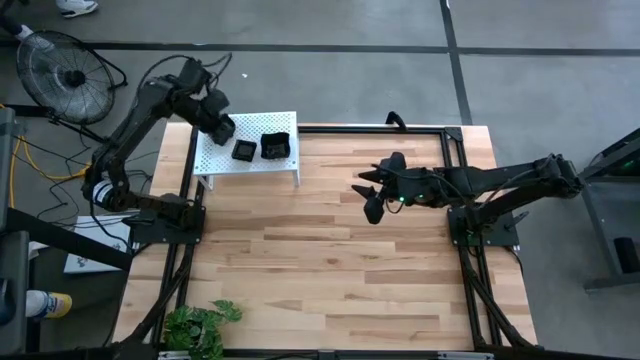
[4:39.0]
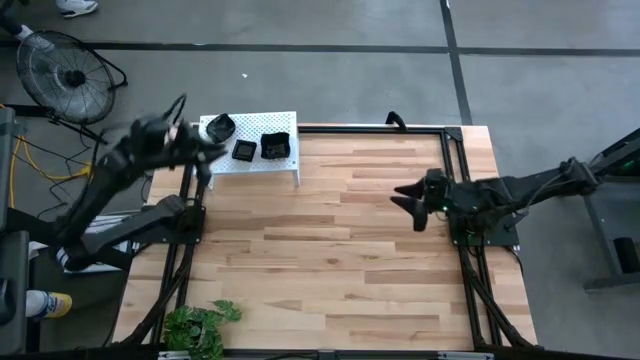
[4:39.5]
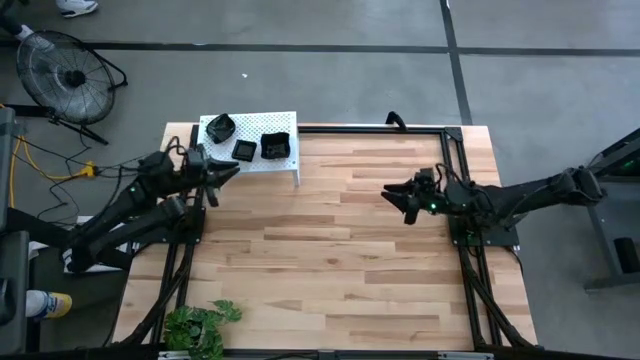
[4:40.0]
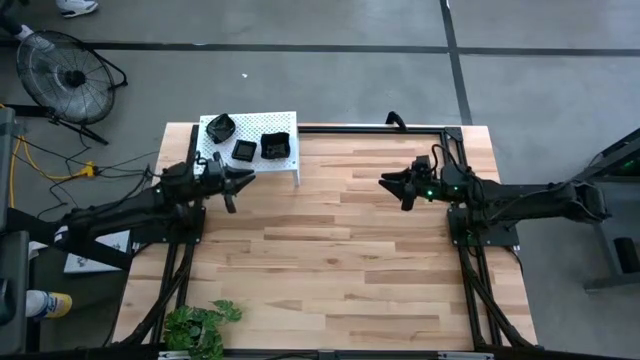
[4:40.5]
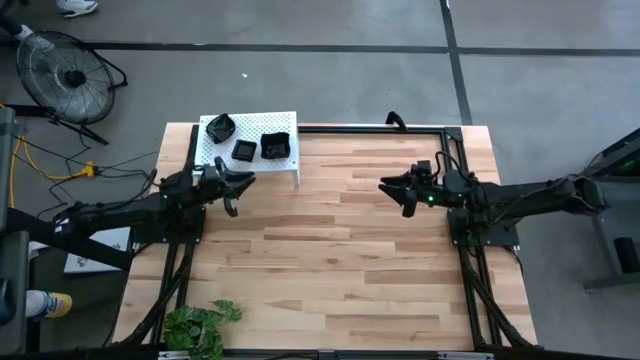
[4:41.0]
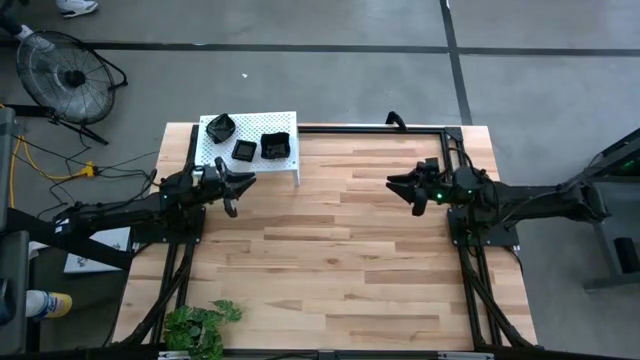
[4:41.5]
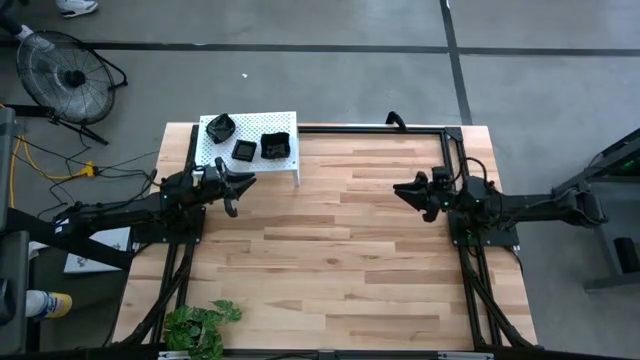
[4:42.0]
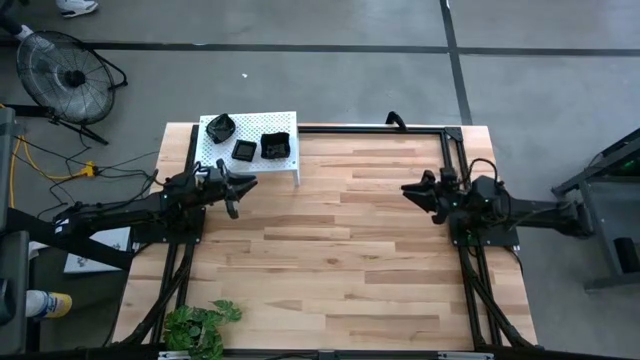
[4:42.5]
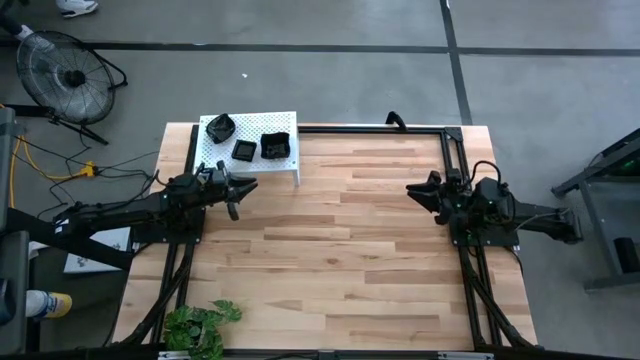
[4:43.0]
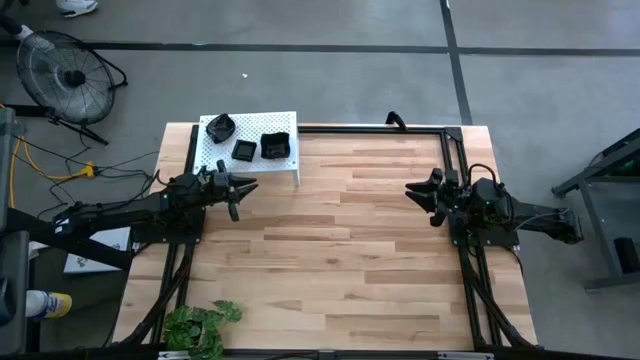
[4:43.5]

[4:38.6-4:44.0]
Task: Pick & Place Mini shaped plates
Return to Home Position

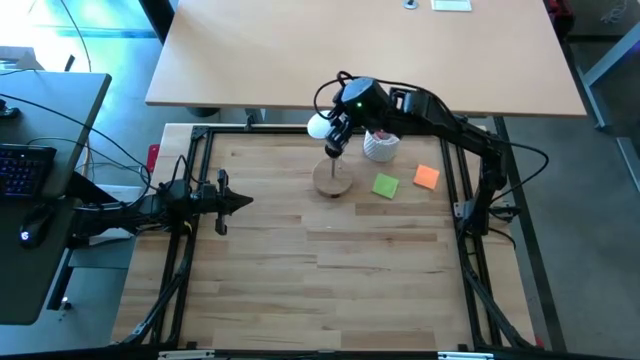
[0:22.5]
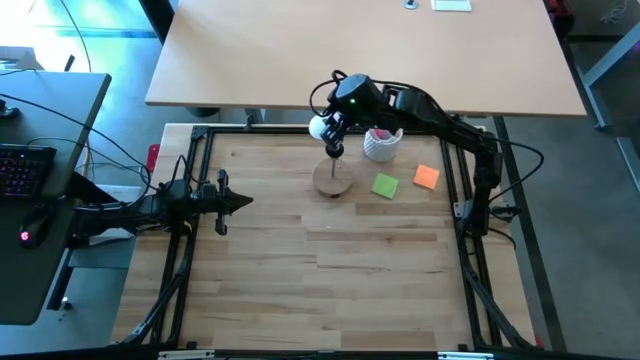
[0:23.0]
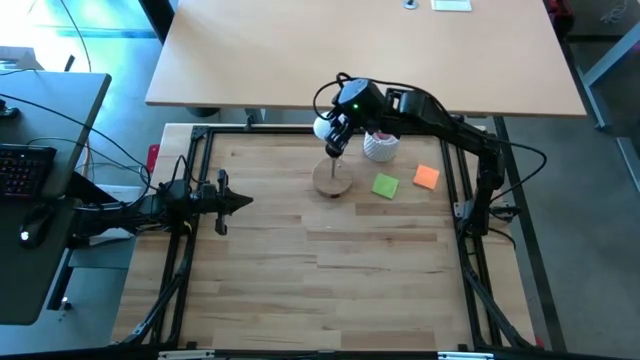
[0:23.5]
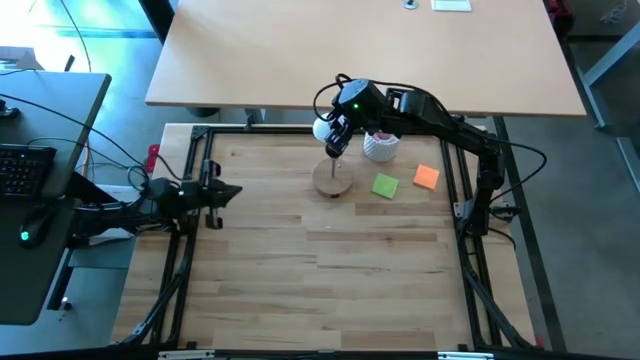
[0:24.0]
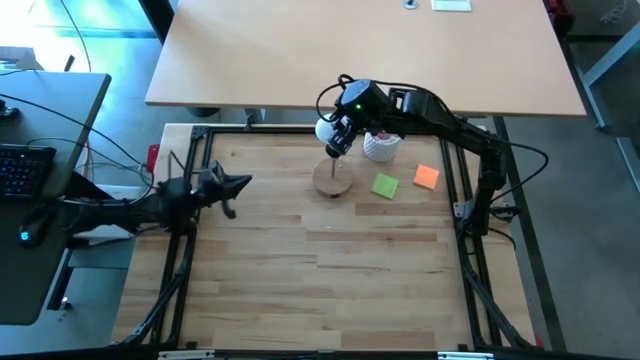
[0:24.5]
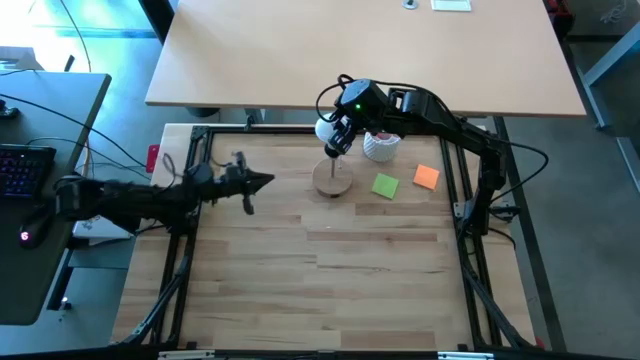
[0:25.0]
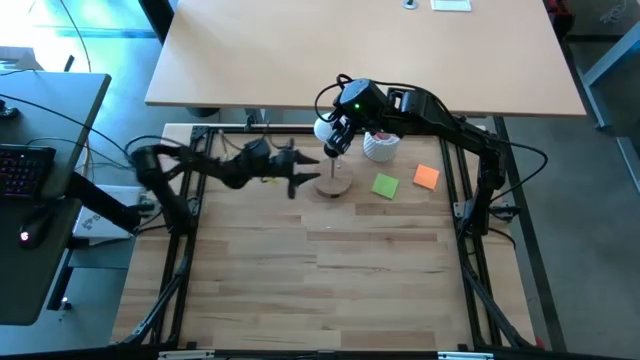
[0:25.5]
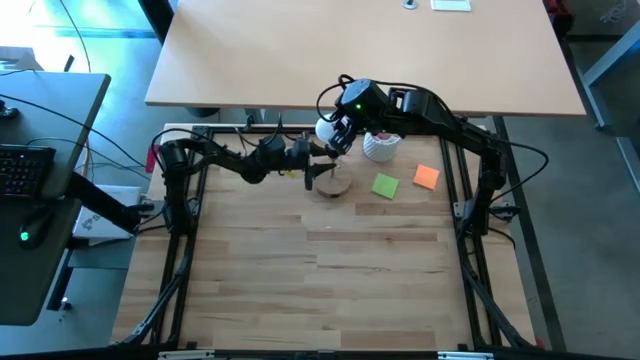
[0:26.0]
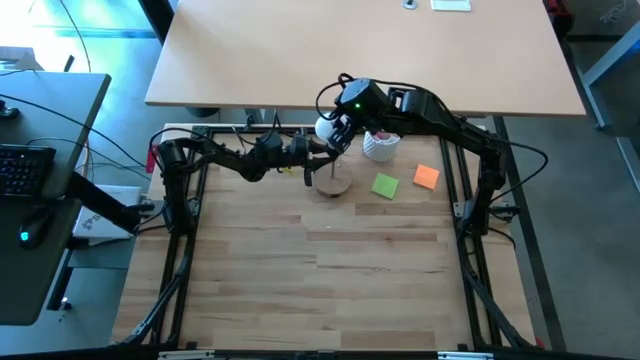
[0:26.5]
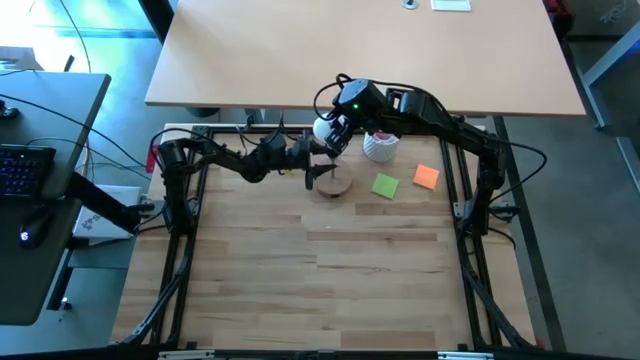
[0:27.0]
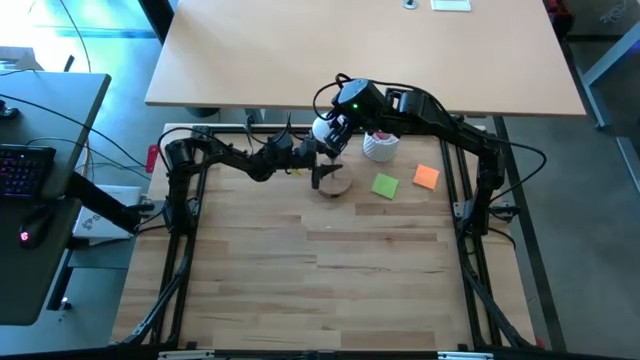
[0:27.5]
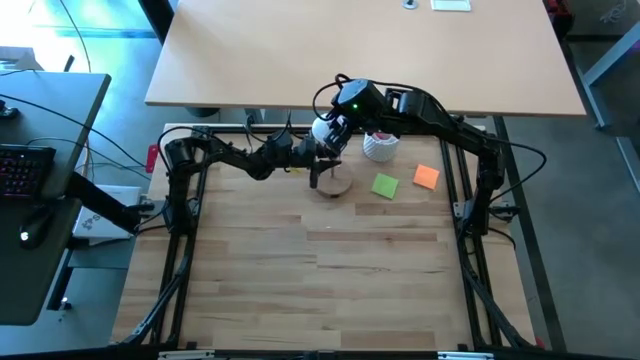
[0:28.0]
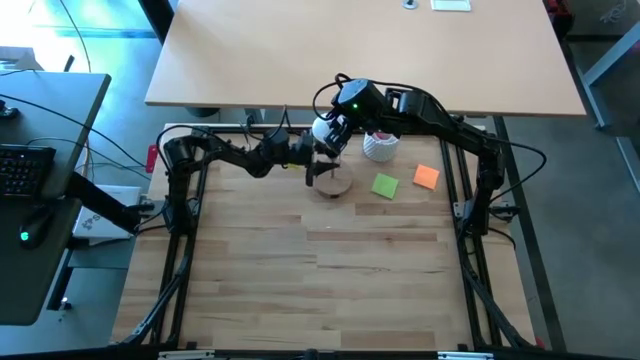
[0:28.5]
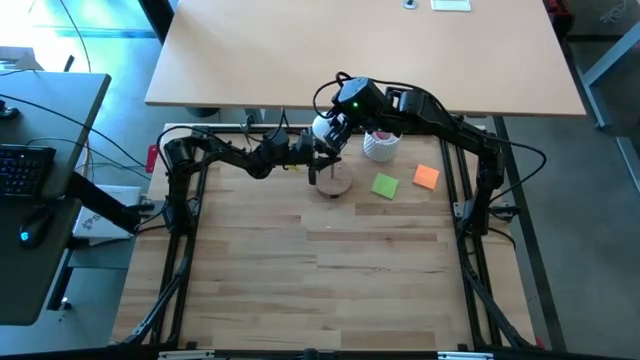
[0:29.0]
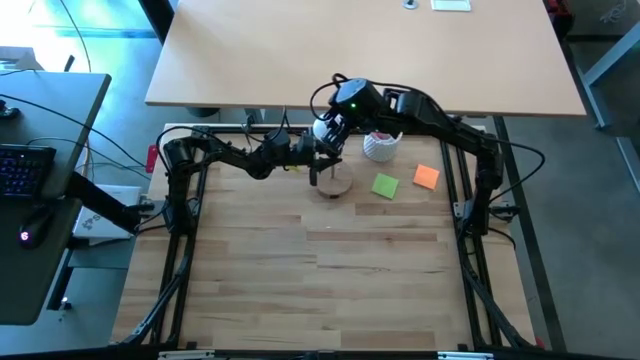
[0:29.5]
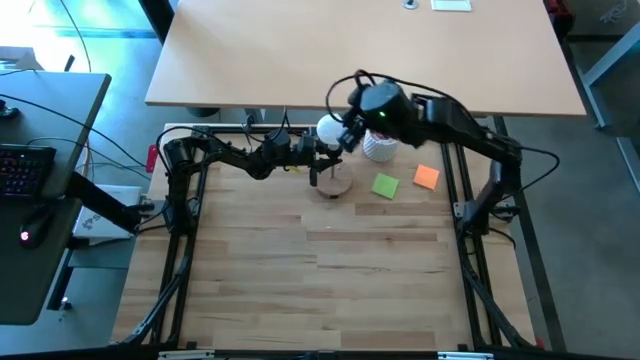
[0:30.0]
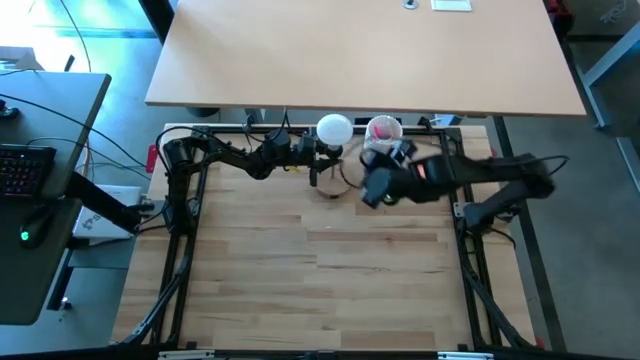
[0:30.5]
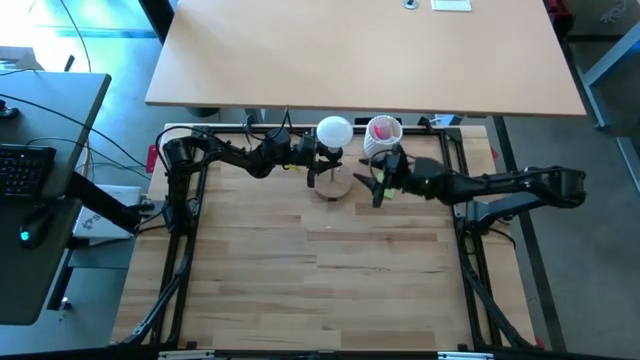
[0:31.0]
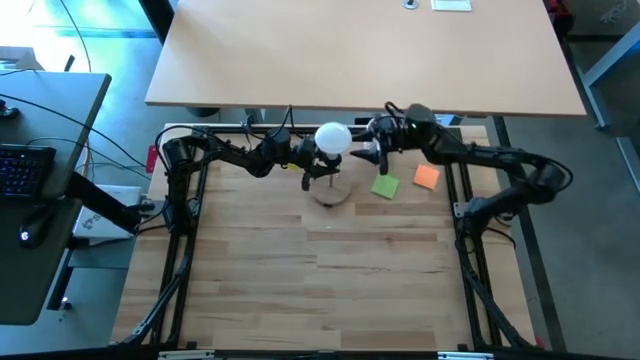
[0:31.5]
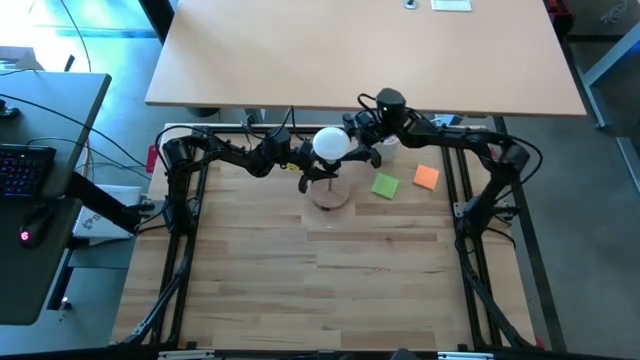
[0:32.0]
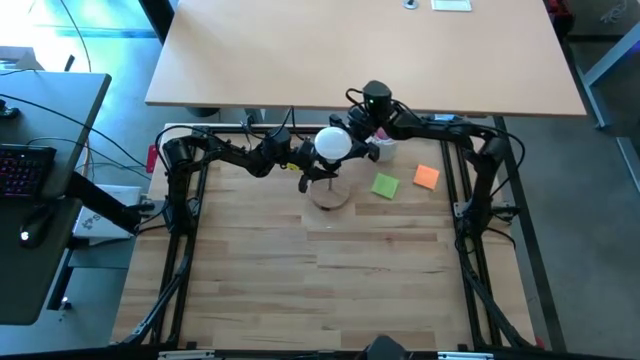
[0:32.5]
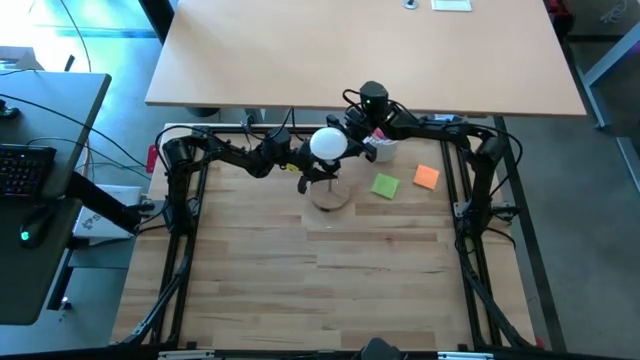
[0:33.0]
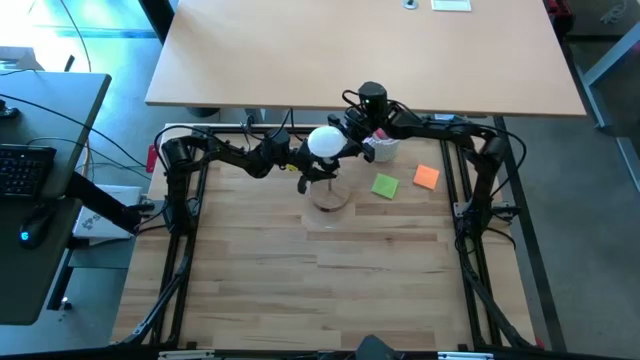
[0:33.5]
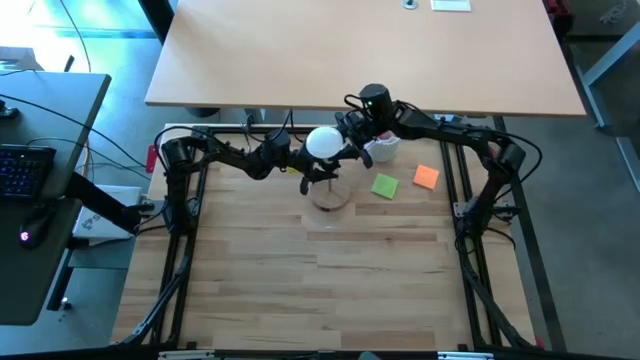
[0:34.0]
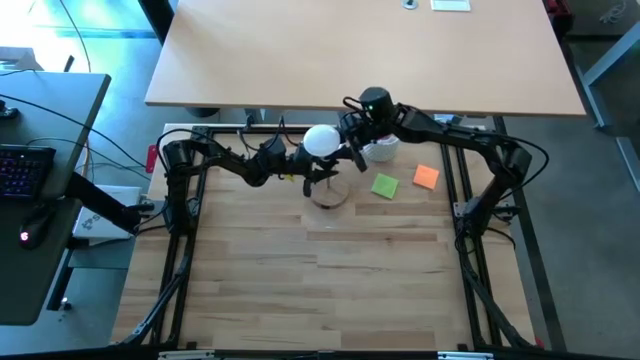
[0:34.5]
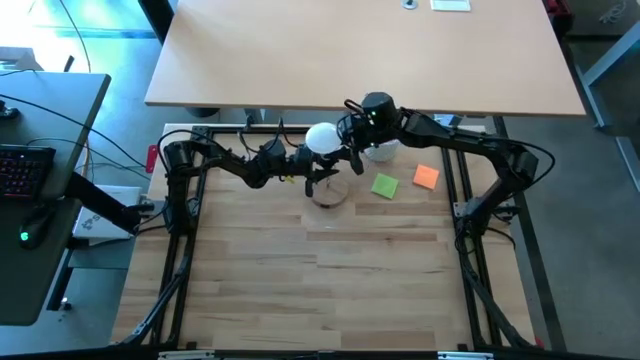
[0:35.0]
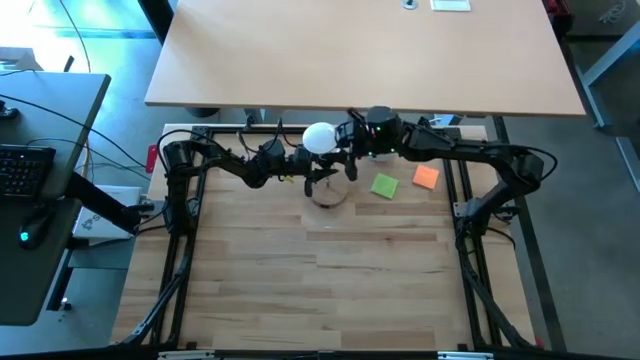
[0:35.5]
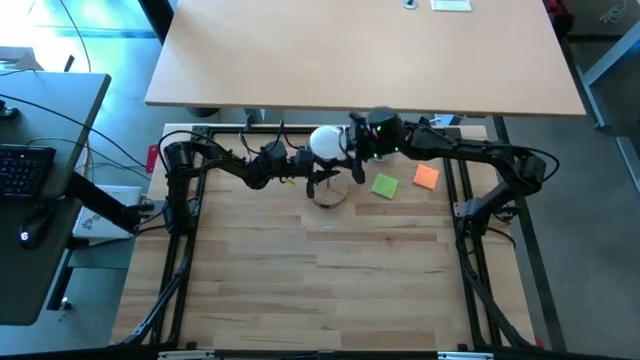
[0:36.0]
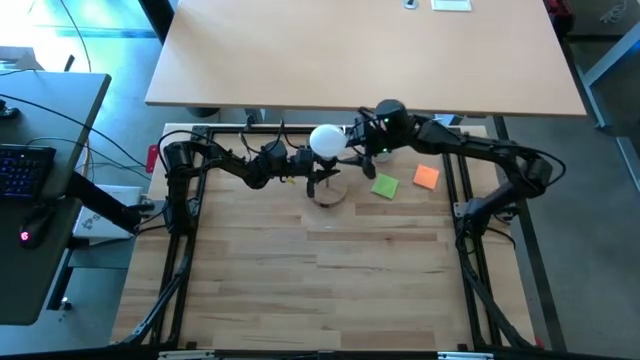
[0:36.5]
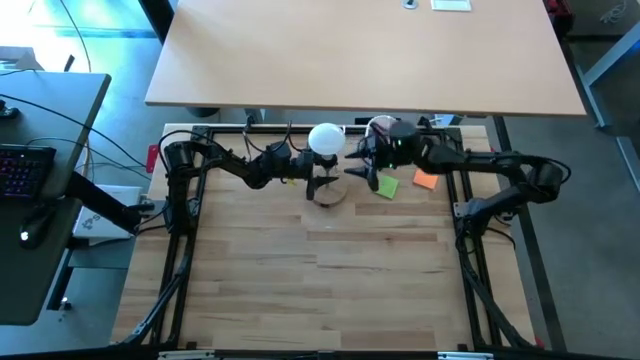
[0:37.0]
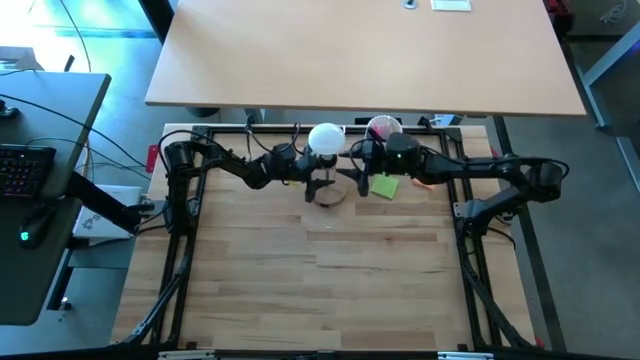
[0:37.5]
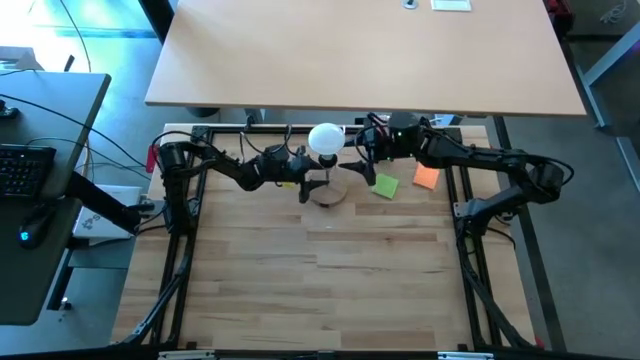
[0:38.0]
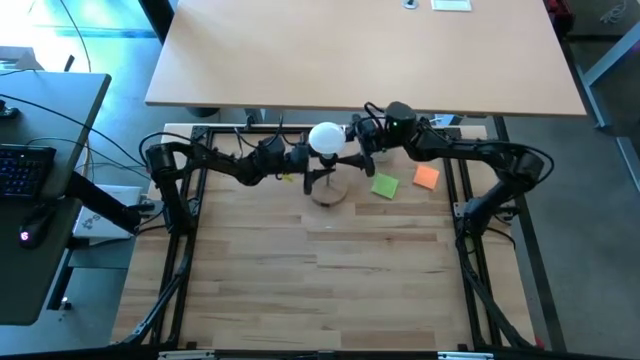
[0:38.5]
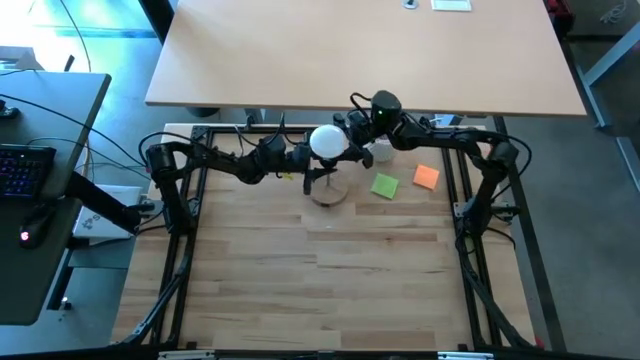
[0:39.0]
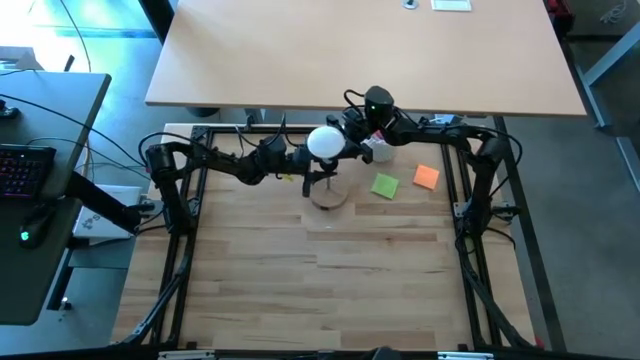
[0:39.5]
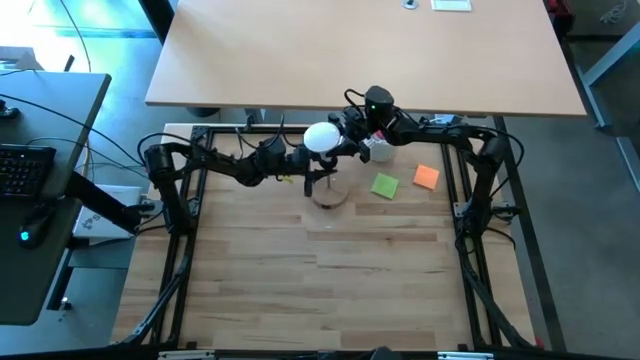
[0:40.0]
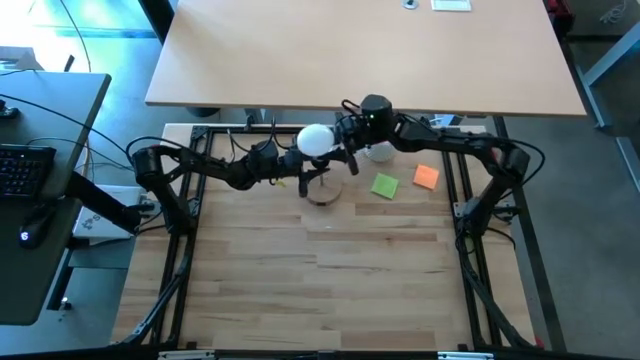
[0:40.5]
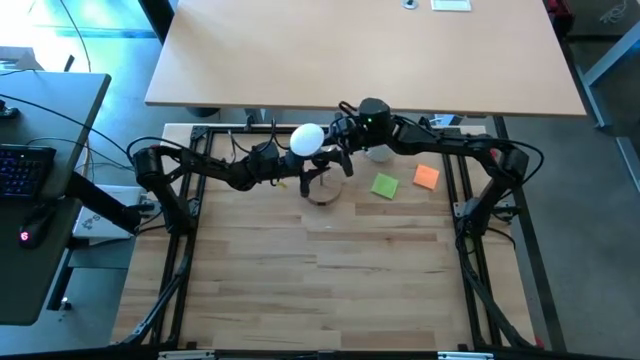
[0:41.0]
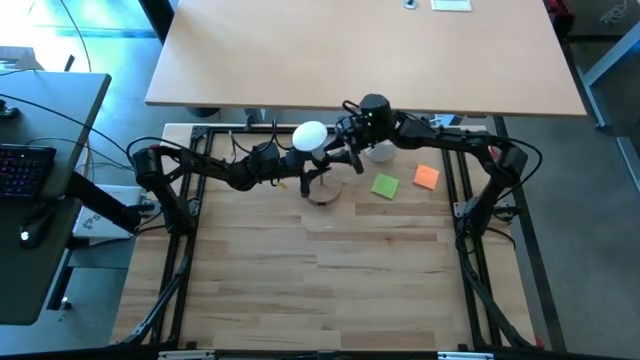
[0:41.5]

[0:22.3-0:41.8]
Task: Screw lightbulb
Insert the lightbulb into the lamp socket
